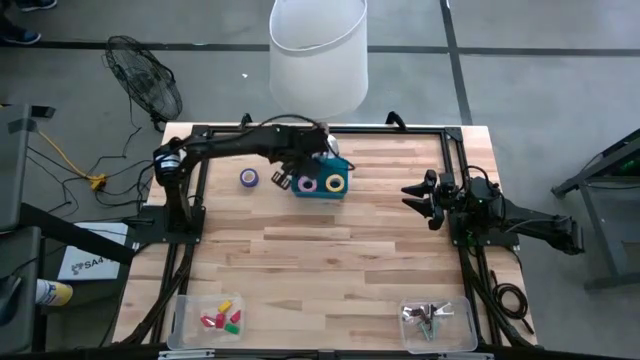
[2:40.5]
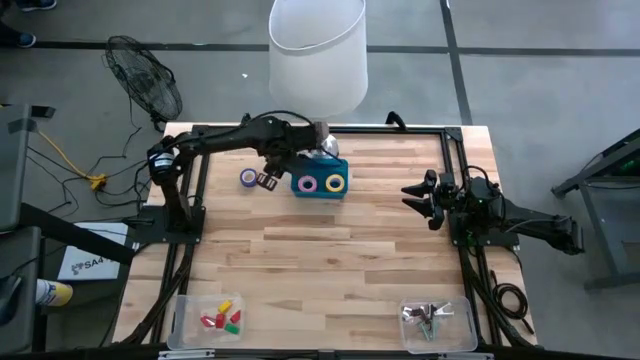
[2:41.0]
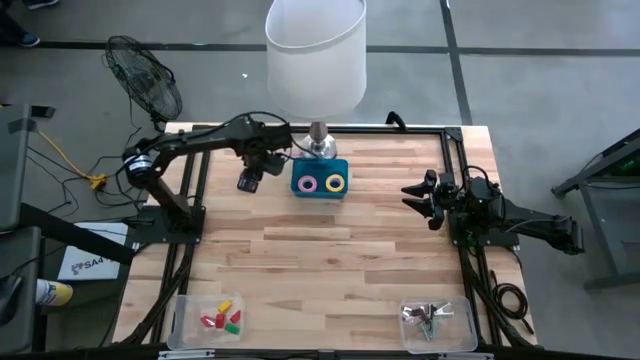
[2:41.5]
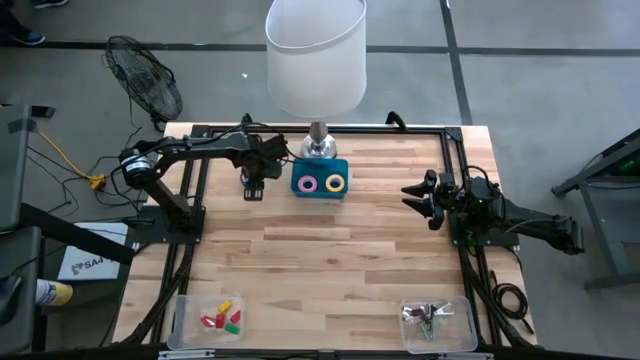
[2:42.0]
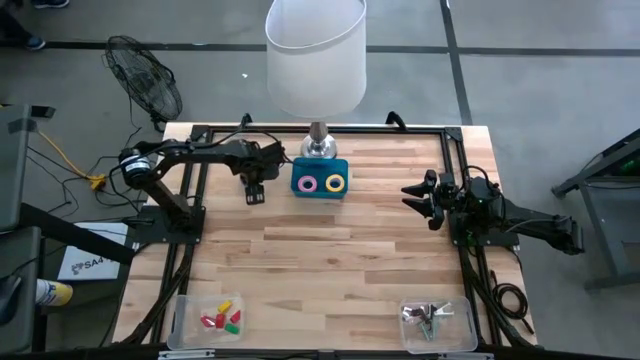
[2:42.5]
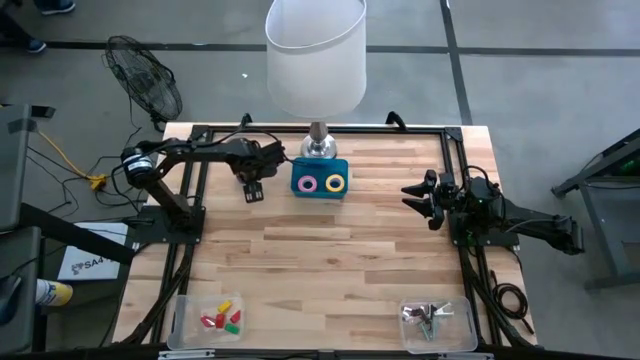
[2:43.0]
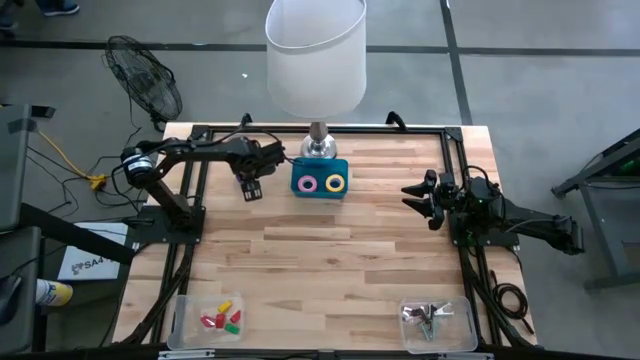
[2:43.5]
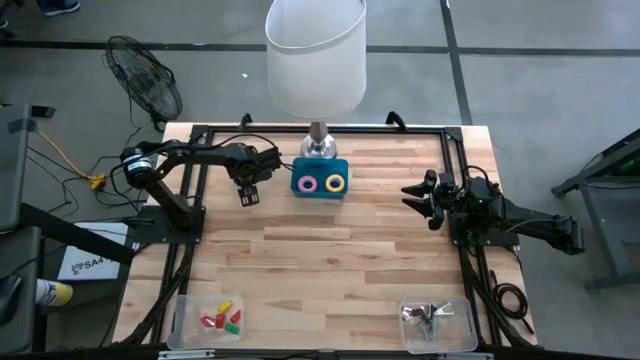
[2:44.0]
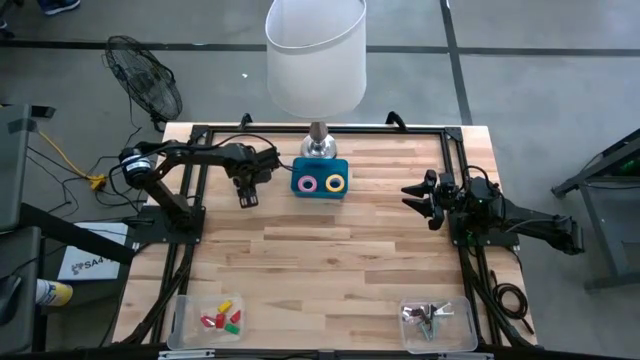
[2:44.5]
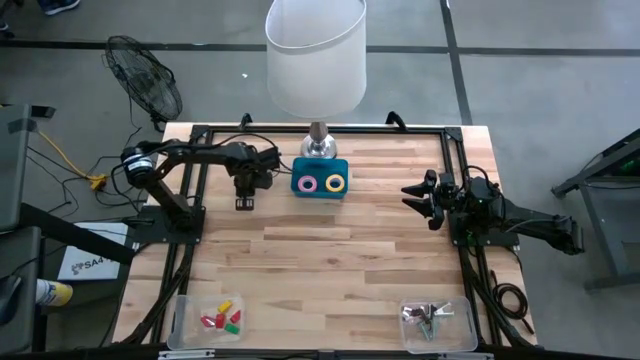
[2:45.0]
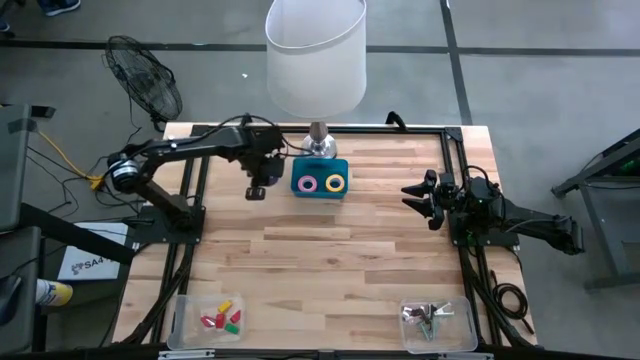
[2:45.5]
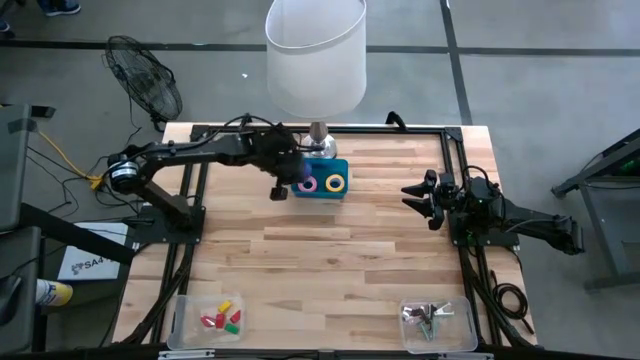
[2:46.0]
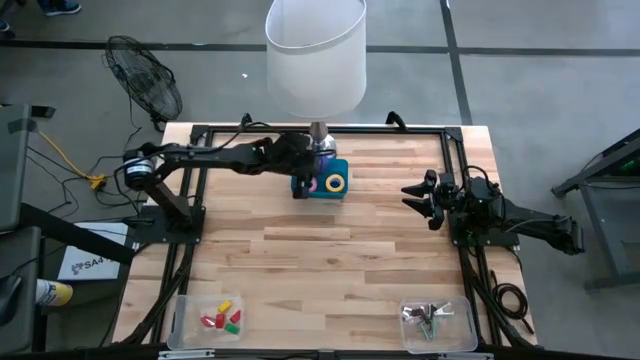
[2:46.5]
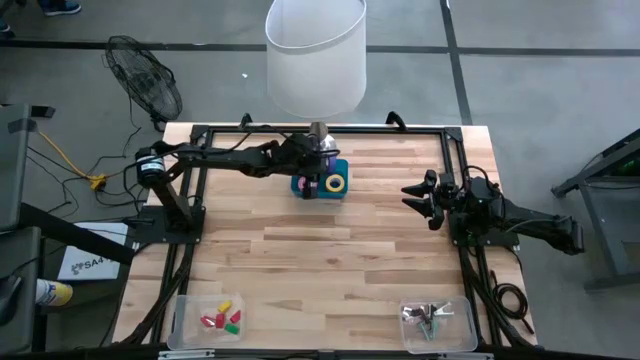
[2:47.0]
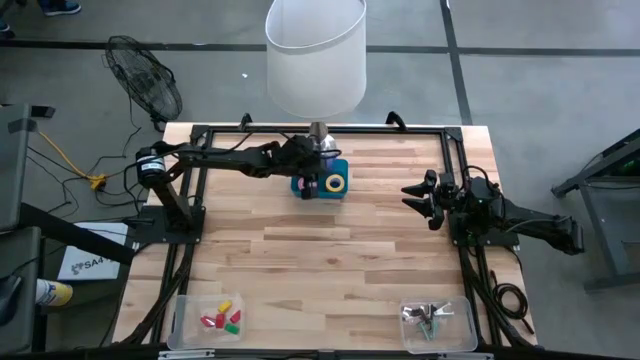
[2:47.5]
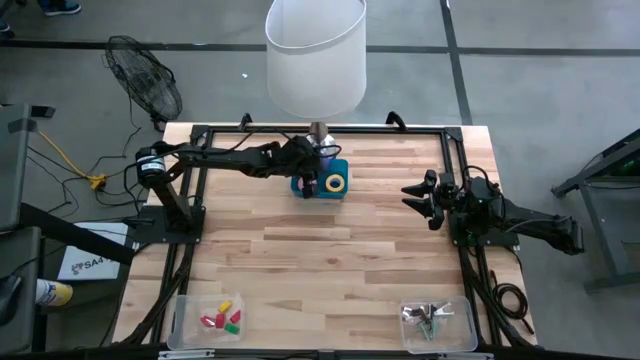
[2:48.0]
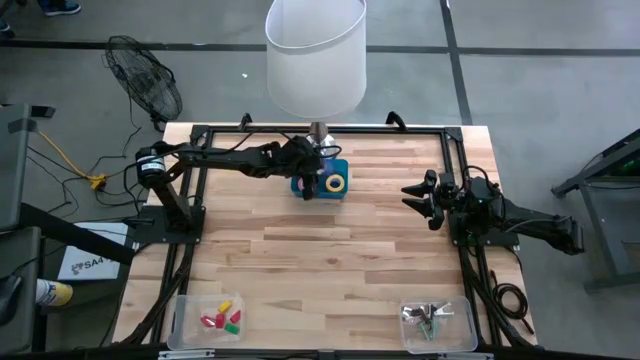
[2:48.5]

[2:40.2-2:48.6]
Task: Pick and place Stapler, Stapler remover, tape
Put the blue tape into the blue bin

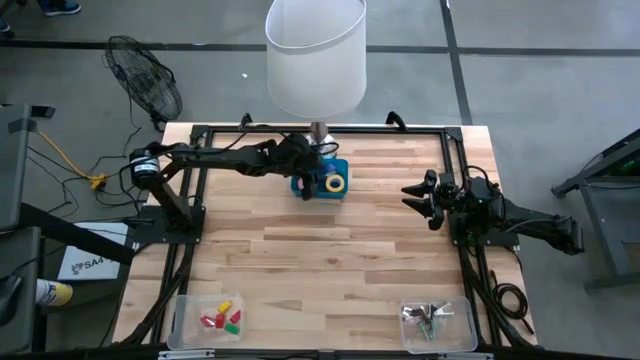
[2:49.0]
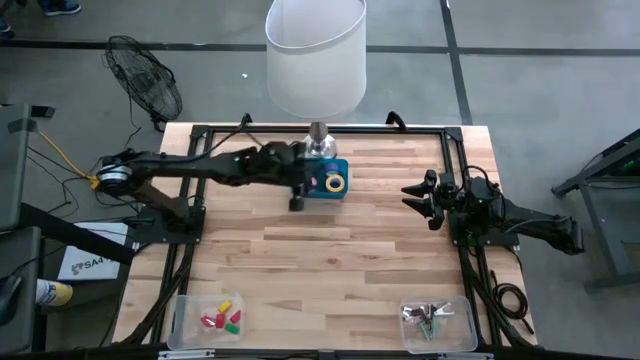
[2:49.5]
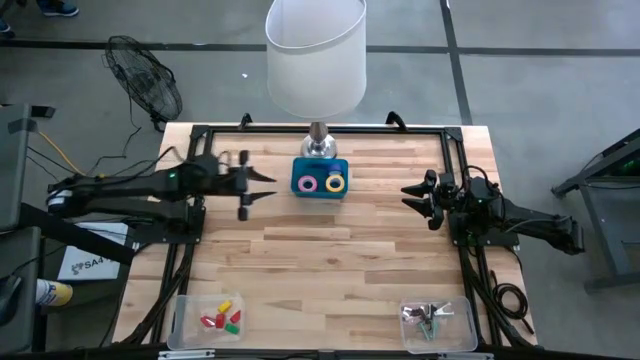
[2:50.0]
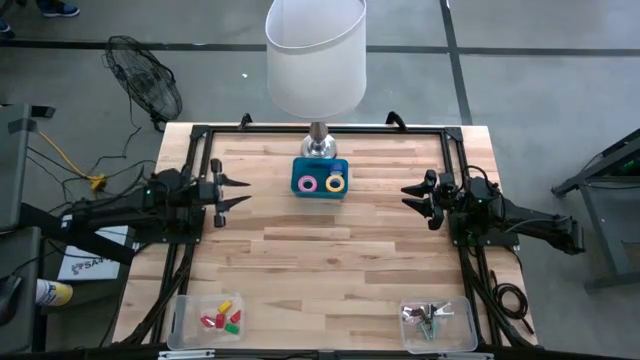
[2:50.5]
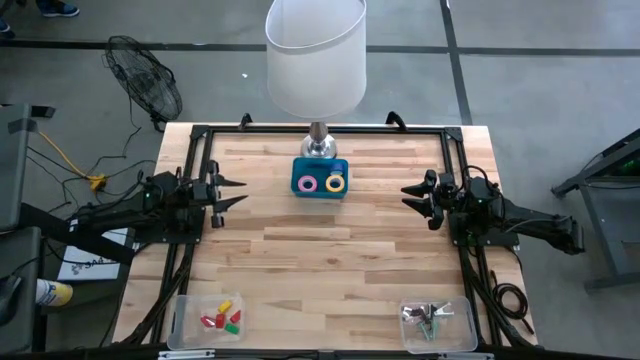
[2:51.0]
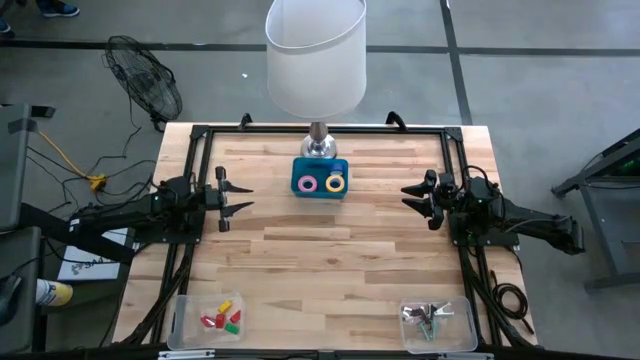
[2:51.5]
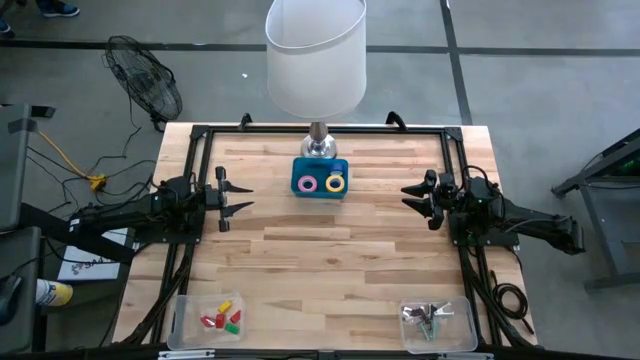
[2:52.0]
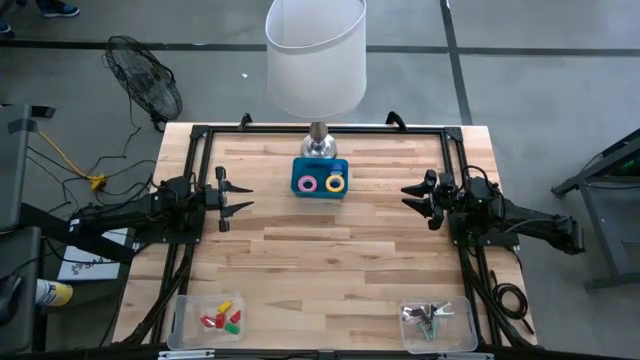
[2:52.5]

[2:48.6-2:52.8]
Return to Home Position

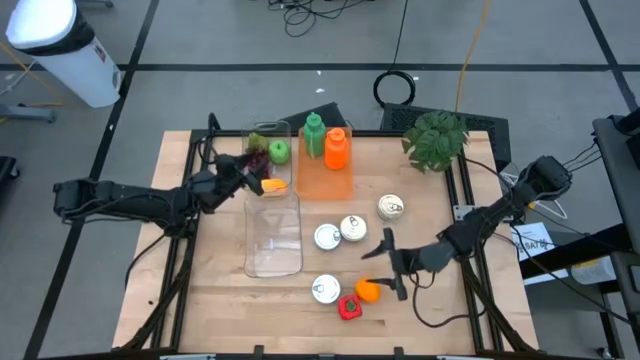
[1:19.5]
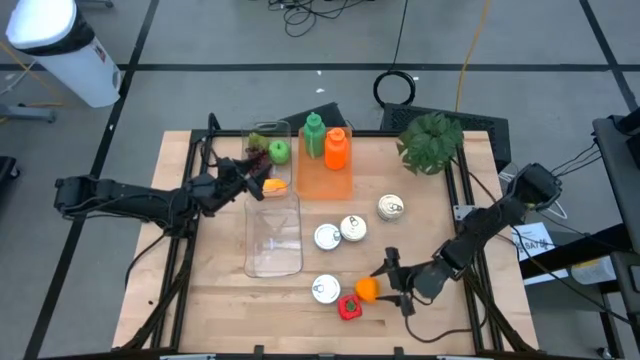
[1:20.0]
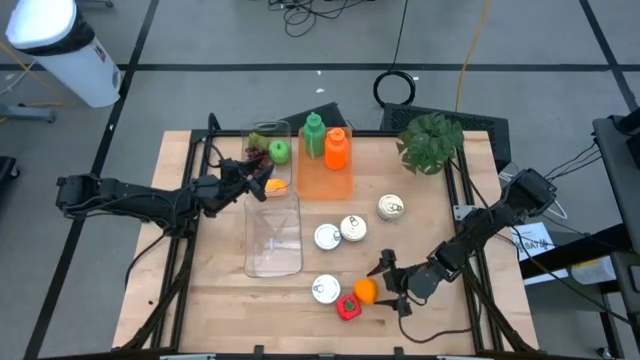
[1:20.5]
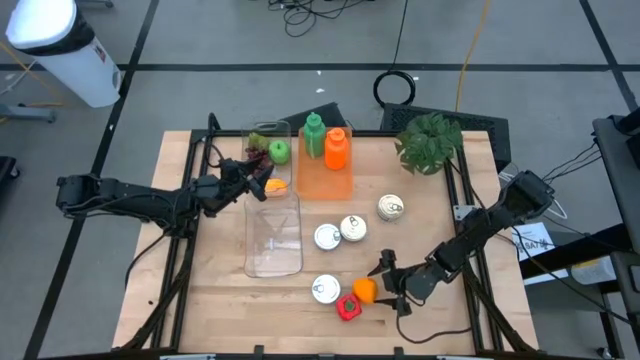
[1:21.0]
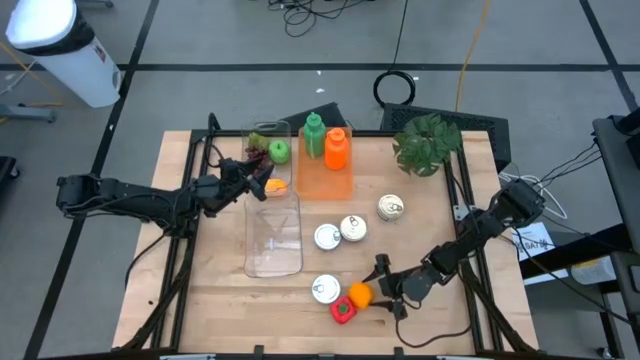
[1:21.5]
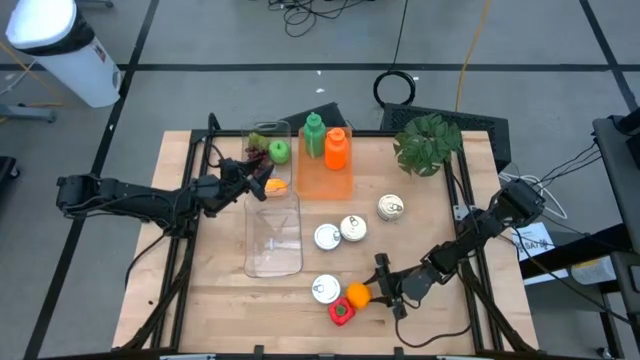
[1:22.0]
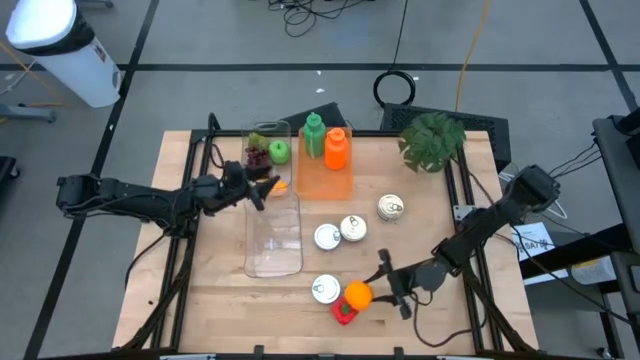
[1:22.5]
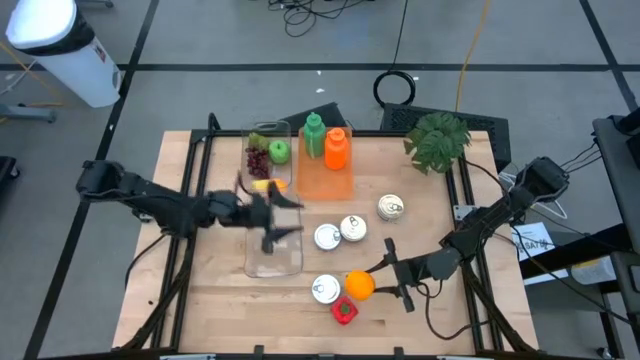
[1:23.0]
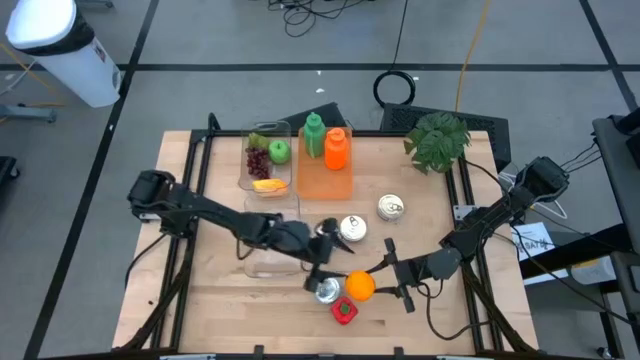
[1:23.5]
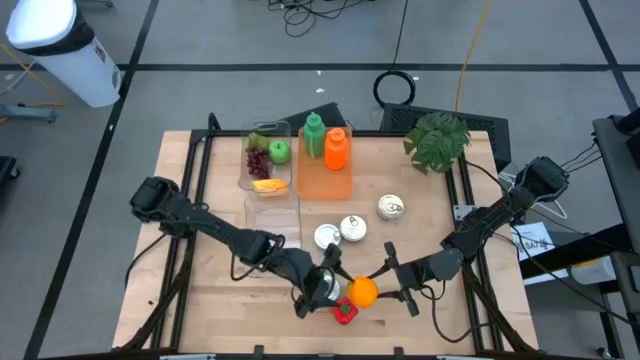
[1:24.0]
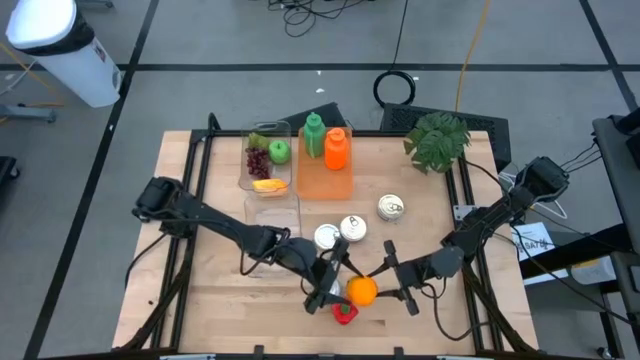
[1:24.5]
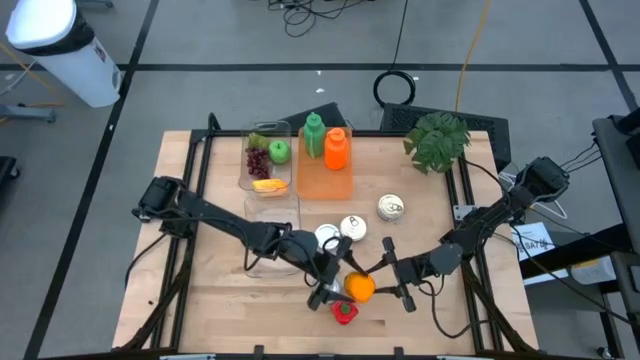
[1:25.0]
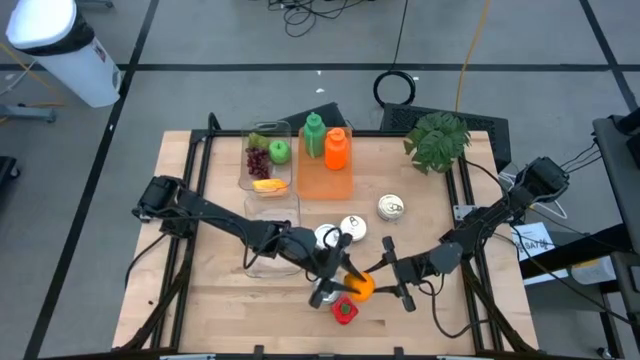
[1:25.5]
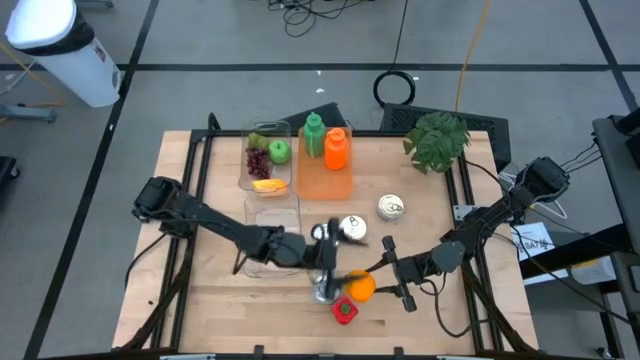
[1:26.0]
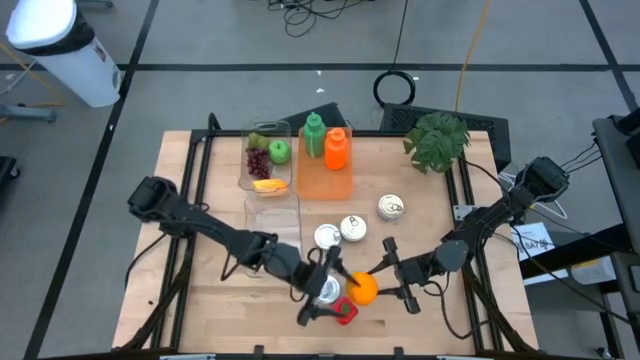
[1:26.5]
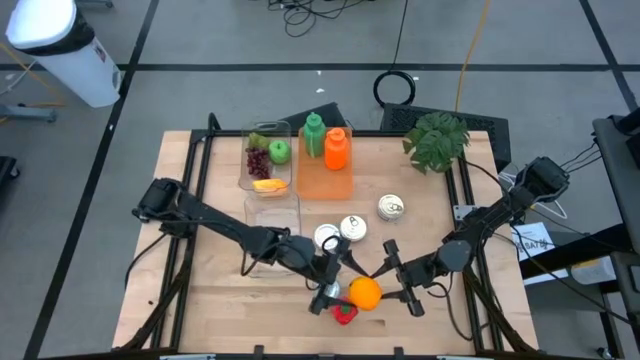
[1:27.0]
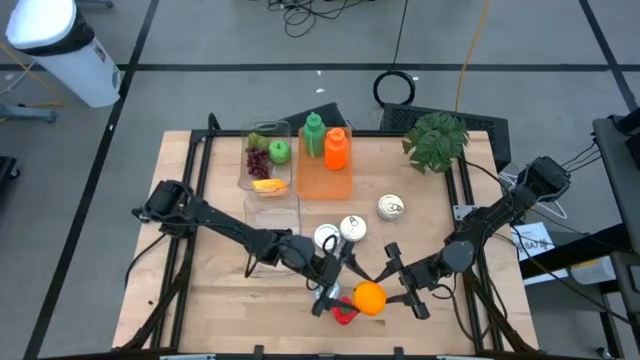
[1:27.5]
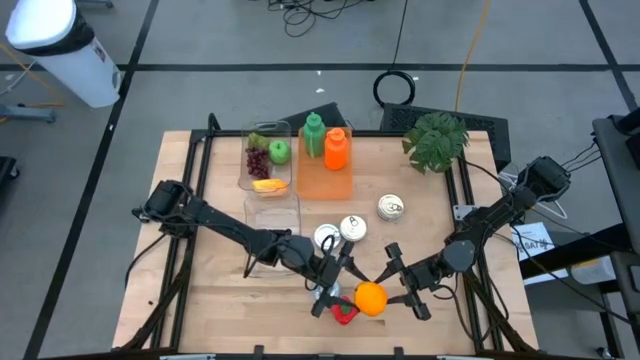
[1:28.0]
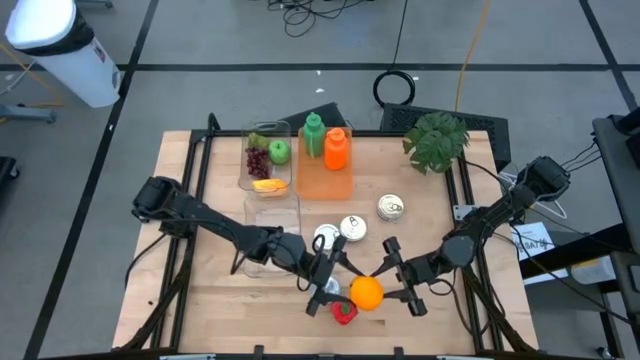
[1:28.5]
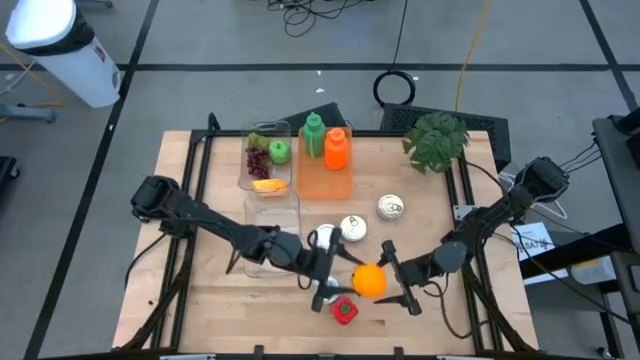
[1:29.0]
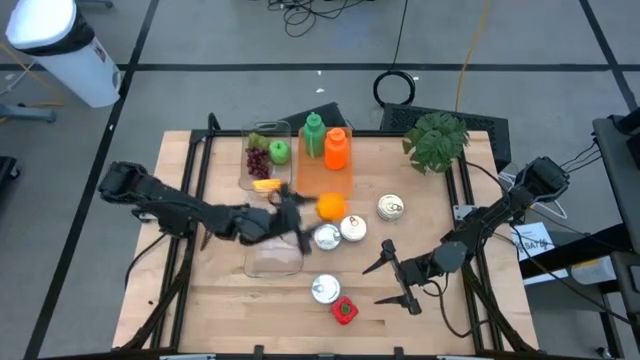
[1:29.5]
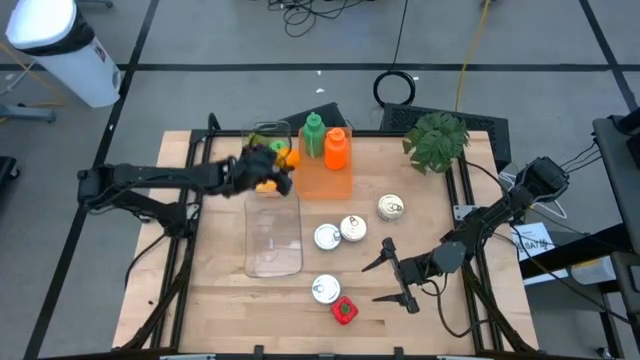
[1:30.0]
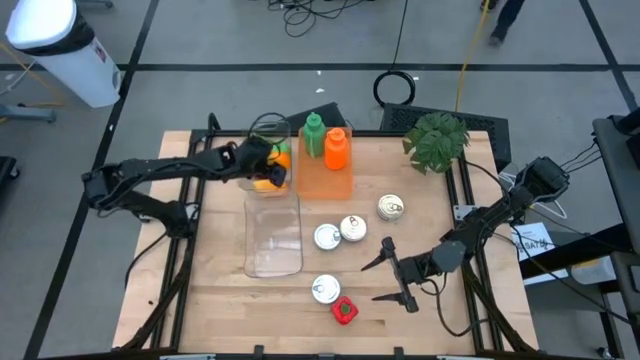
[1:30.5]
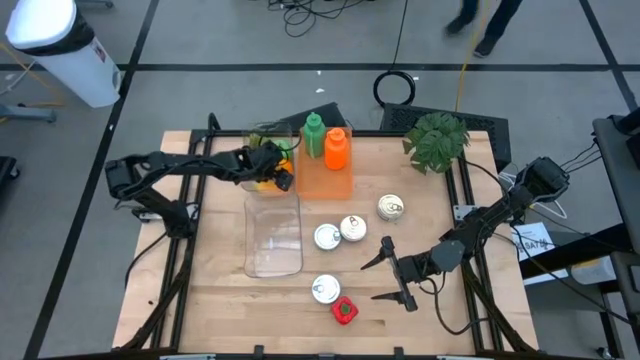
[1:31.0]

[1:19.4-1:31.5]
Task: Pick & Place Food Item
Put the orange into the top transparent bin
